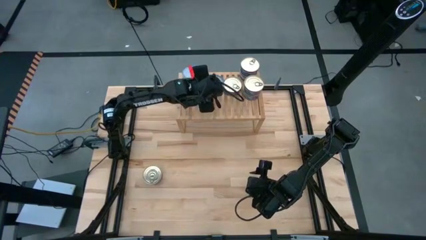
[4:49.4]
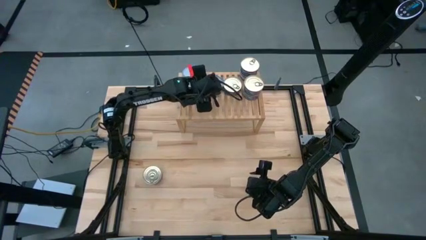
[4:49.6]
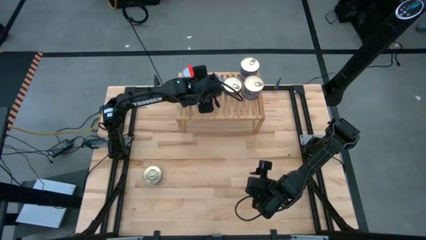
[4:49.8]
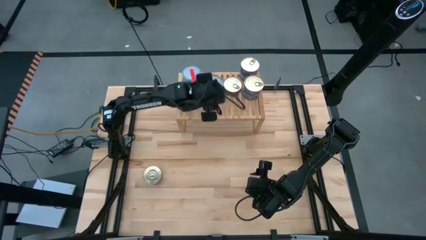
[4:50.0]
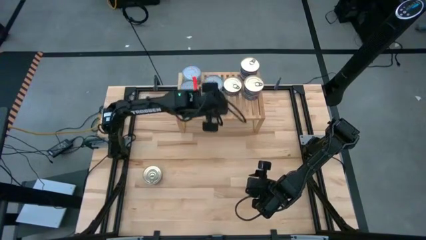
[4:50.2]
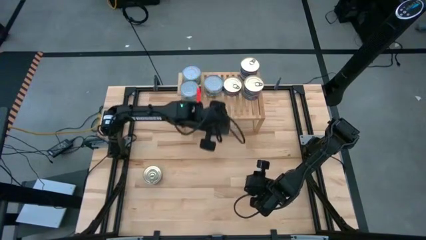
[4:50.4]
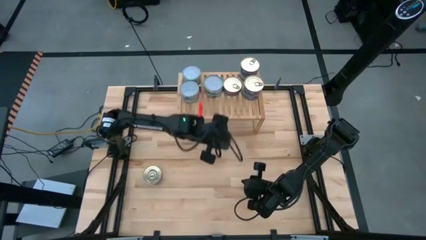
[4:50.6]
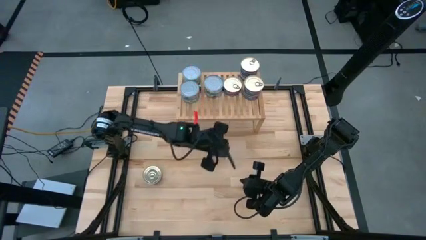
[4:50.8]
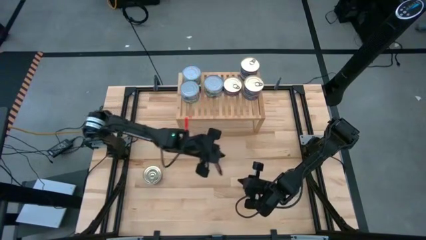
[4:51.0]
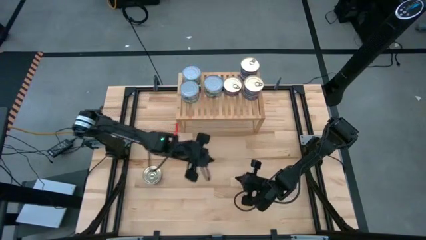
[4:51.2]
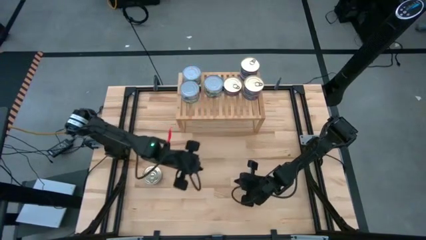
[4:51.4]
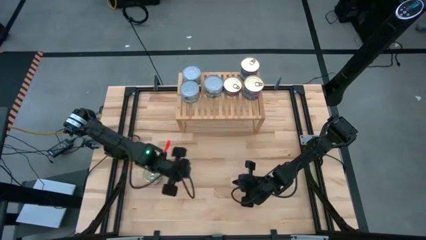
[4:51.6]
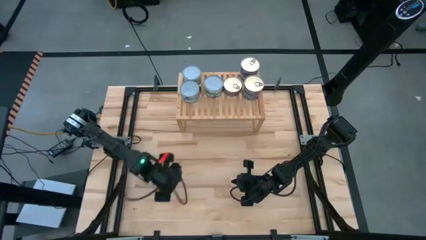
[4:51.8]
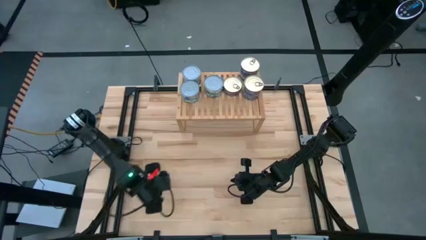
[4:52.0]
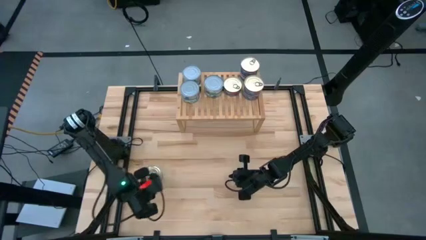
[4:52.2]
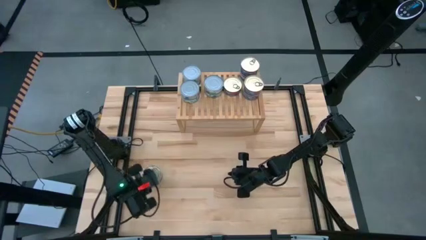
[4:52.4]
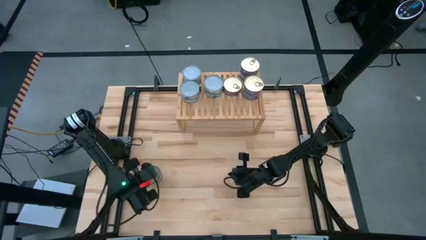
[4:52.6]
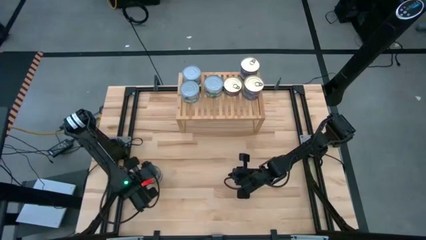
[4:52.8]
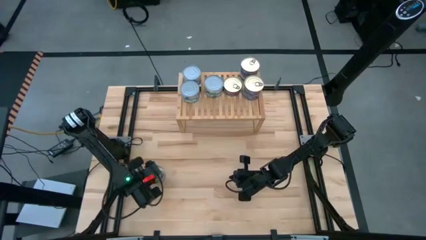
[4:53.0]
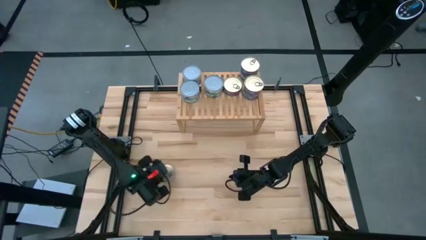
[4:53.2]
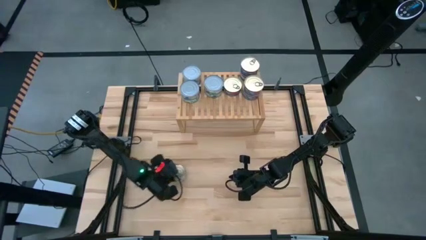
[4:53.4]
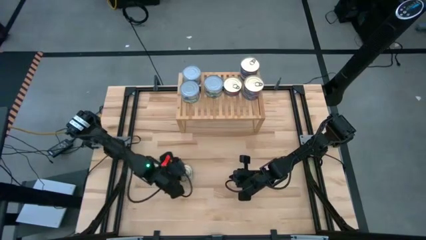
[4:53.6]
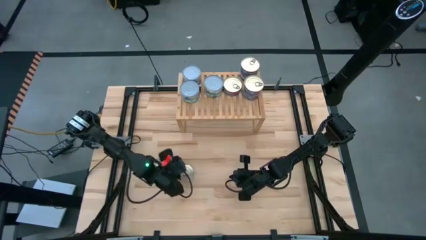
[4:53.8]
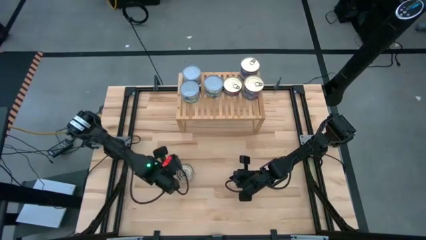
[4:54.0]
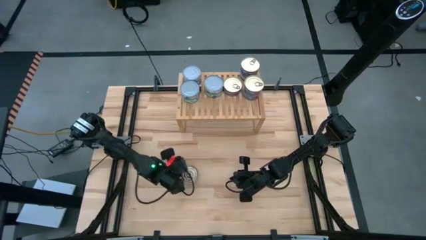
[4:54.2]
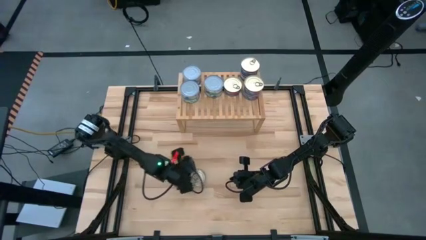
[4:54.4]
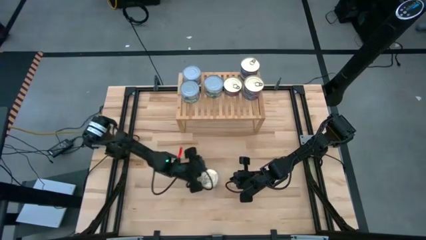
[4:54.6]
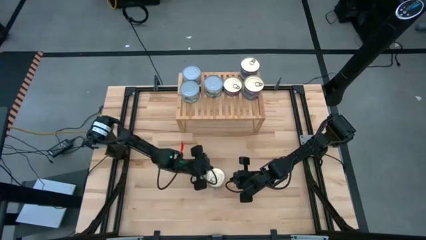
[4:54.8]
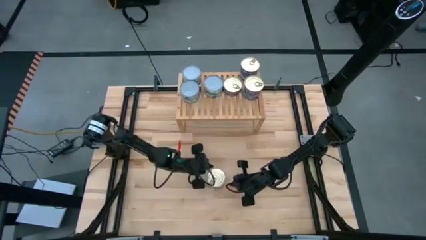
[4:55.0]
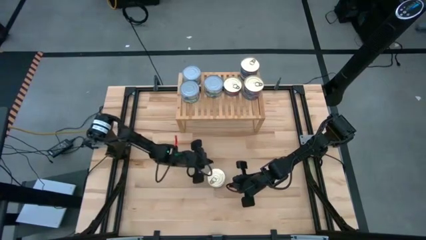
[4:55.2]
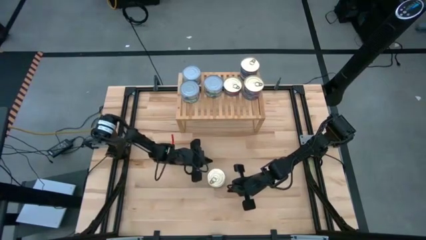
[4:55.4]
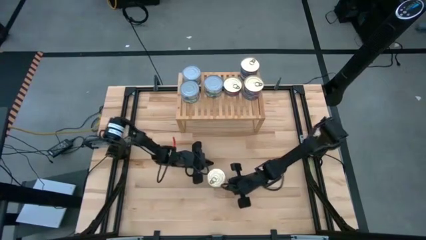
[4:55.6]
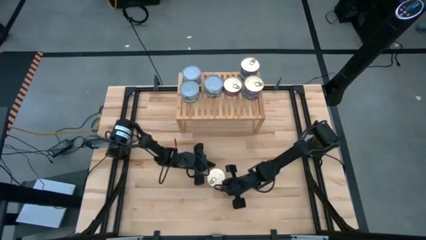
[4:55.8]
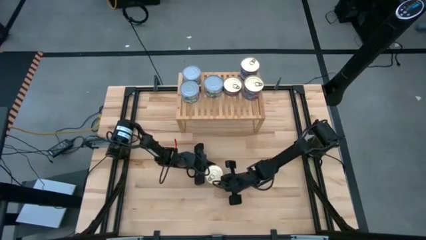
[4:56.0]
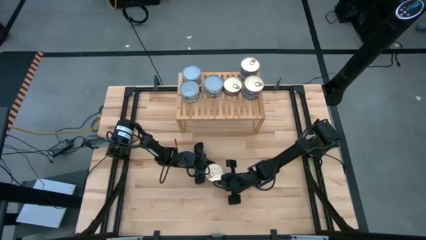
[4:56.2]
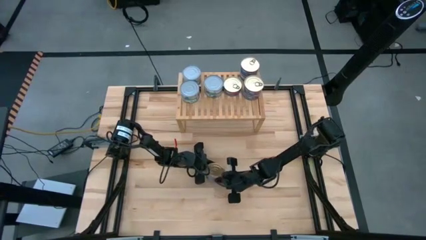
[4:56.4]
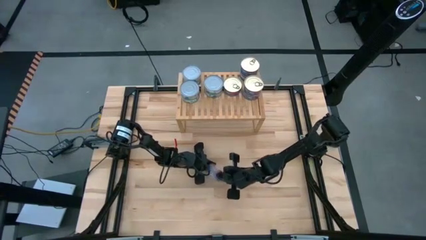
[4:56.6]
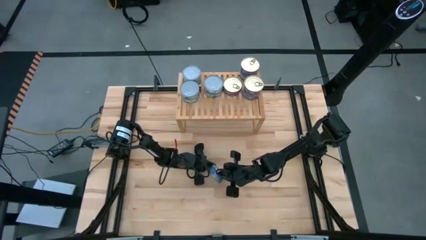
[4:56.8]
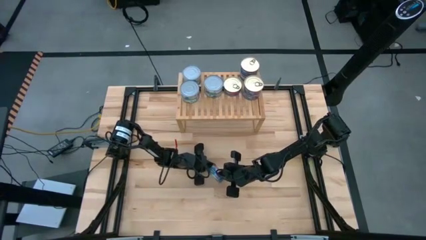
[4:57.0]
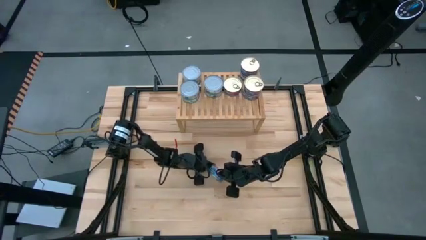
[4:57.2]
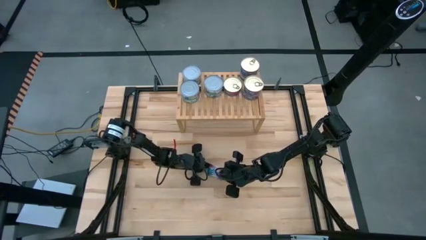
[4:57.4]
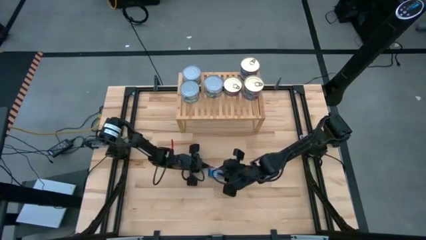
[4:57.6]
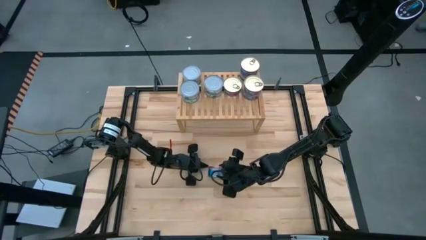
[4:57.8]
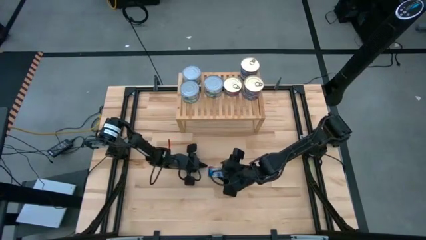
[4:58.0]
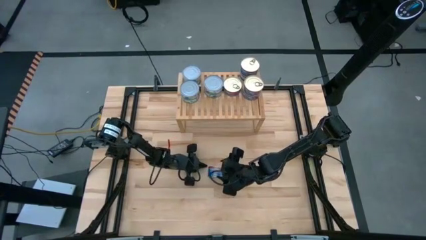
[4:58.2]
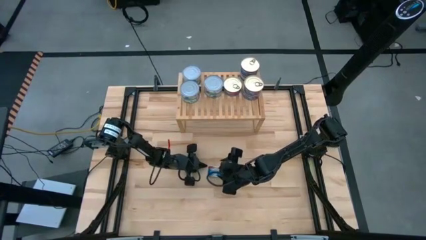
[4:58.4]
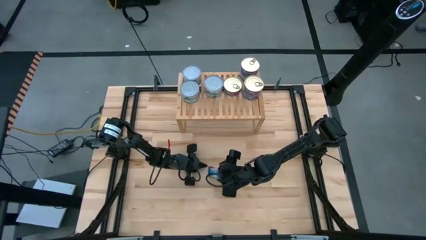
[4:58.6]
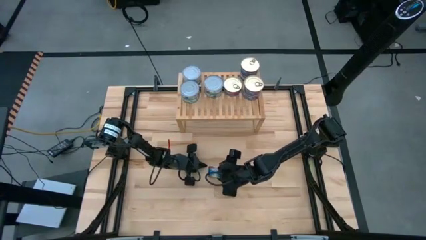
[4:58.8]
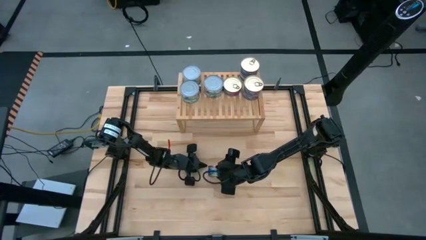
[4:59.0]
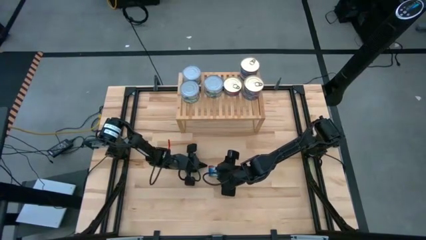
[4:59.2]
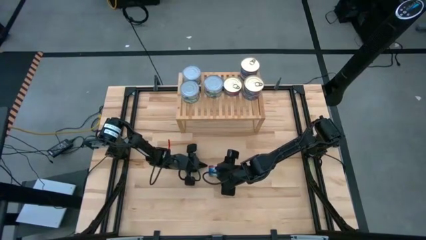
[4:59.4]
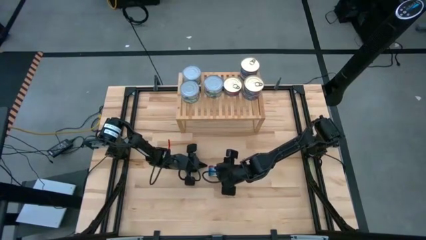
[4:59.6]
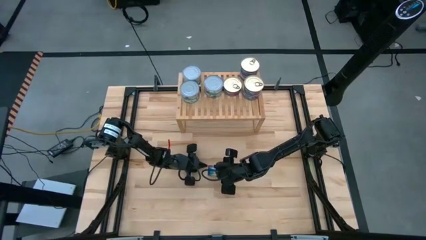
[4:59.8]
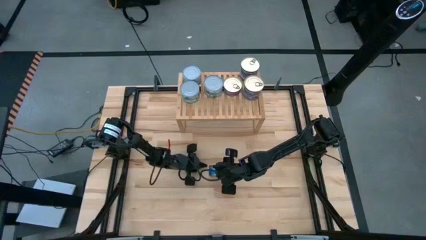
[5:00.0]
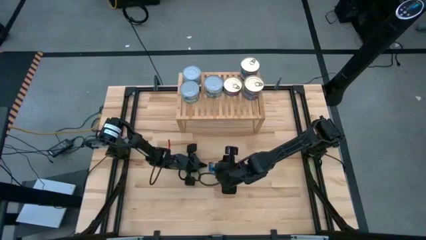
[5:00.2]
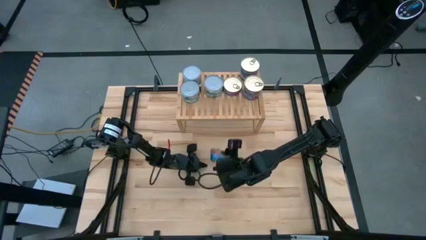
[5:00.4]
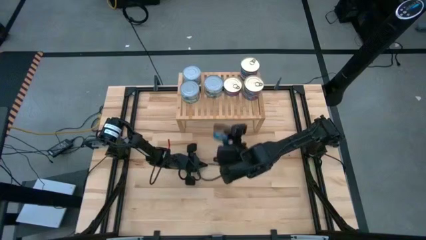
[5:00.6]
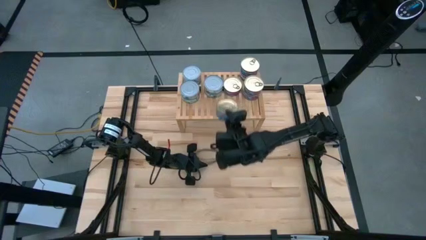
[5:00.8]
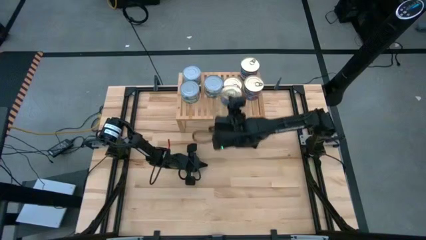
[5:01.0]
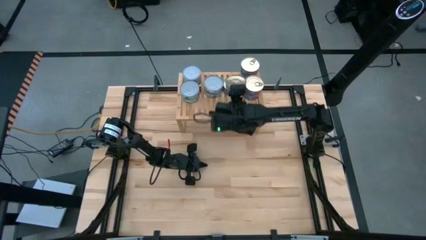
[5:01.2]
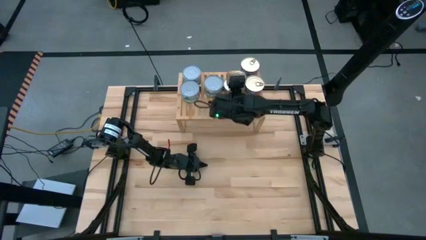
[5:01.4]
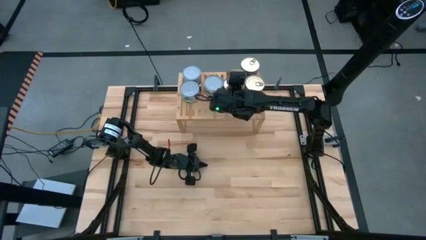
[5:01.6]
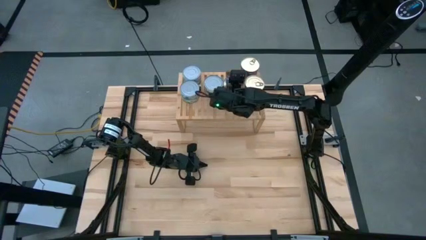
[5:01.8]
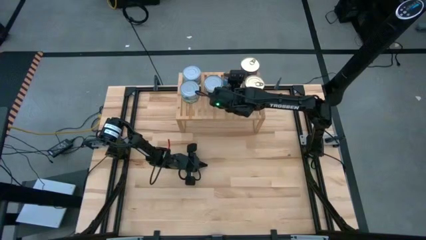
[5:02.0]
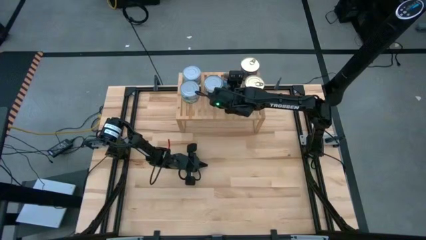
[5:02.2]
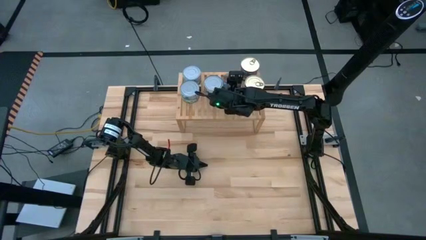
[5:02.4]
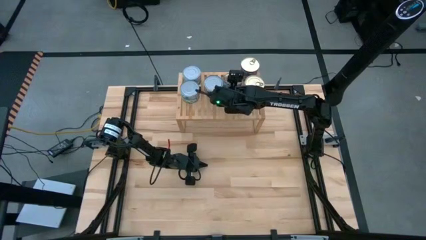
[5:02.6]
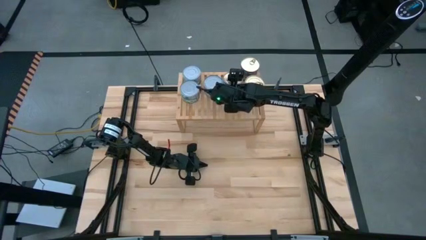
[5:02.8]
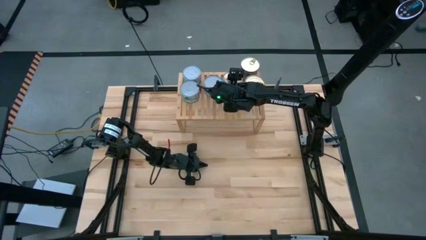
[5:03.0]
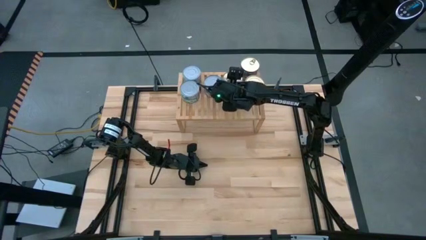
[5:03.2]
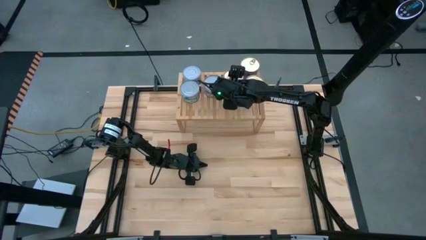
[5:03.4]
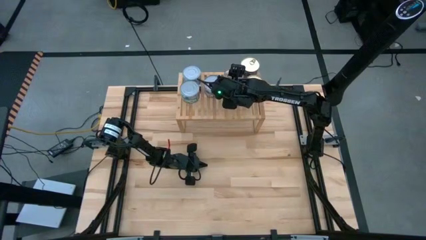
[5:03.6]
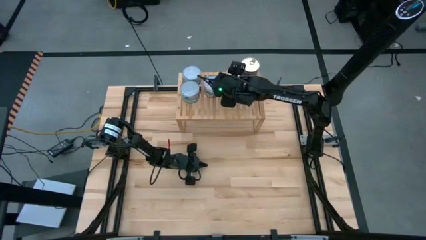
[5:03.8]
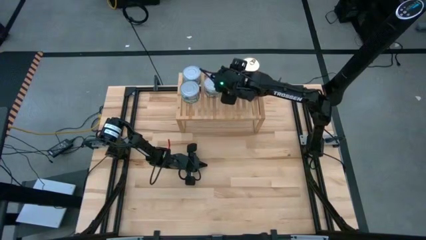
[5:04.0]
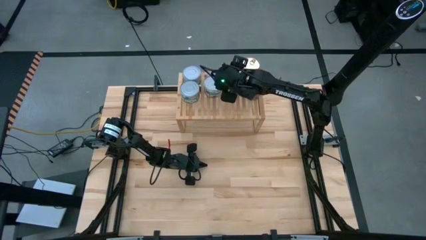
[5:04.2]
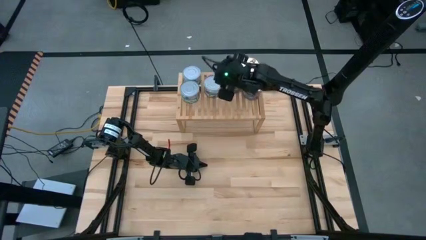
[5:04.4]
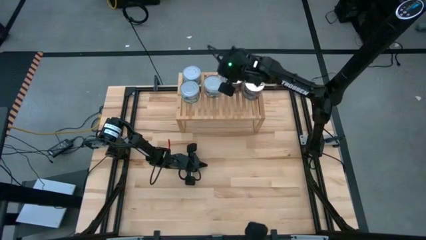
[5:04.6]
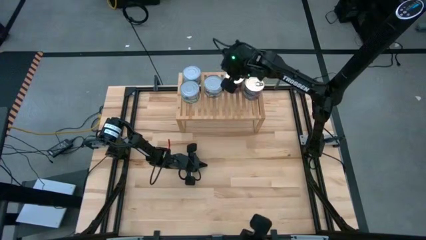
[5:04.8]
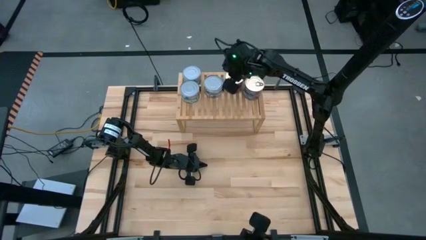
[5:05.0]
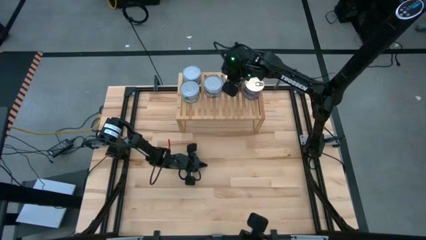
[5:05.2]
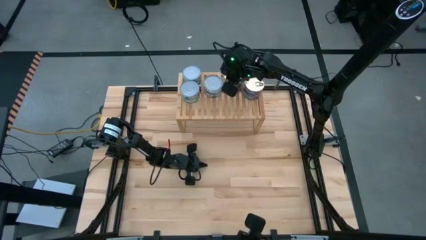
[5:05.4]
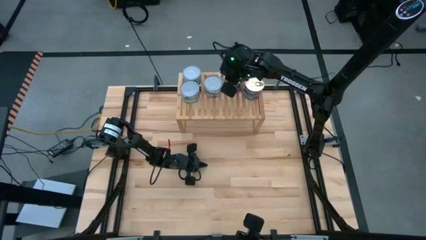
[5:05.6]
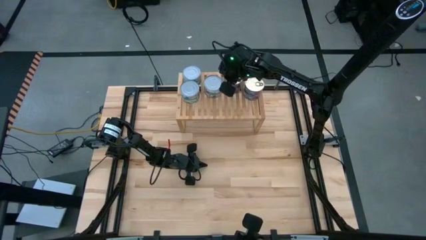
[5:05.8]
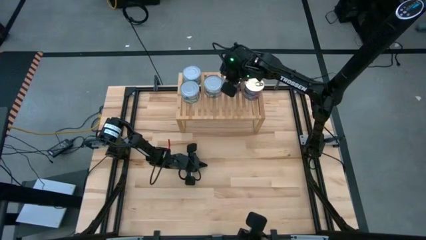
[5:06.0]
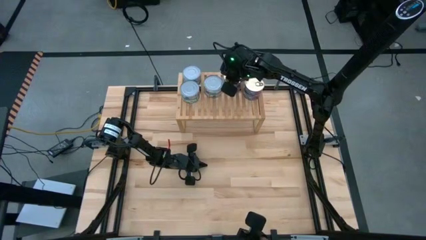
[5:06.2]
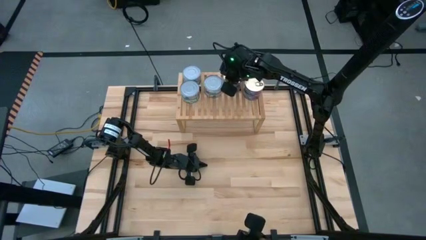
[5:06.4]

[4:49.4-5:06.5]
Task: Stack canned seafood by type on shelf
Stack the blue tuna can on top of the other blue tuna can on the shelf
